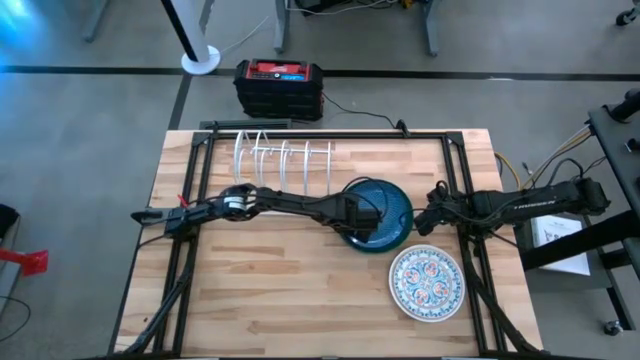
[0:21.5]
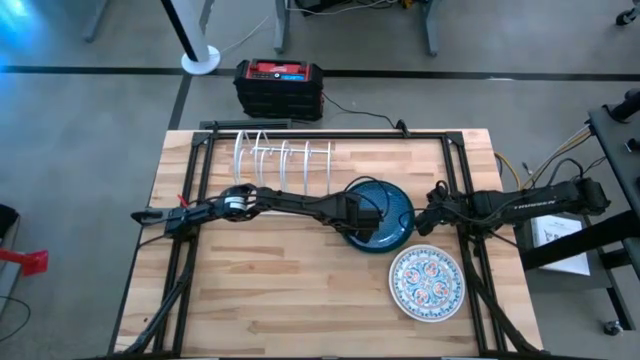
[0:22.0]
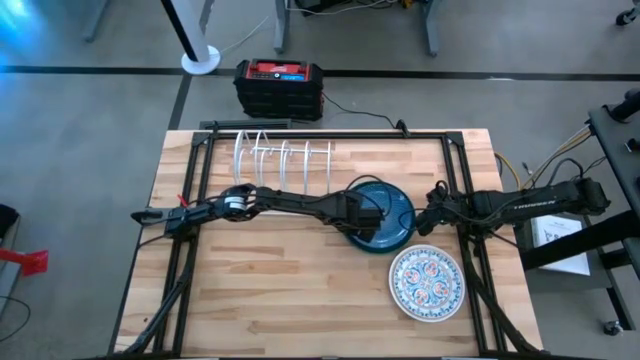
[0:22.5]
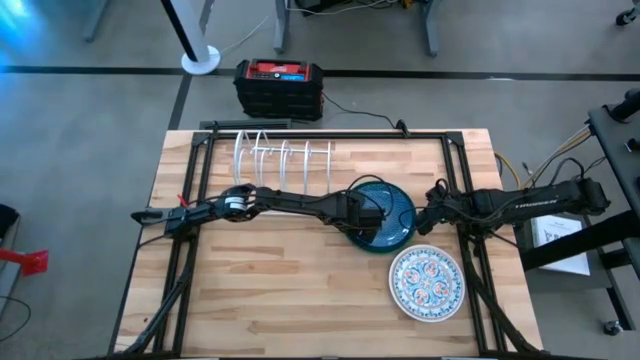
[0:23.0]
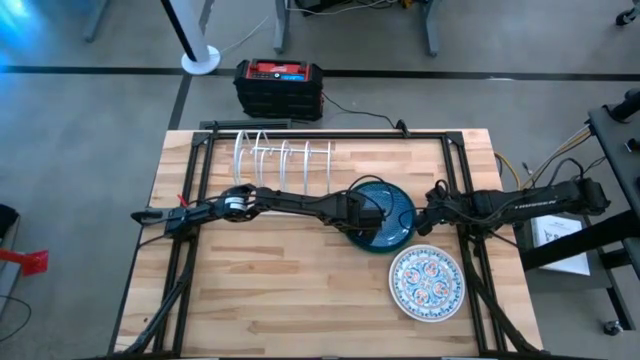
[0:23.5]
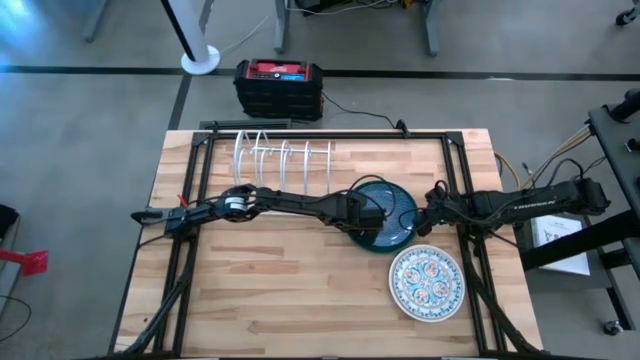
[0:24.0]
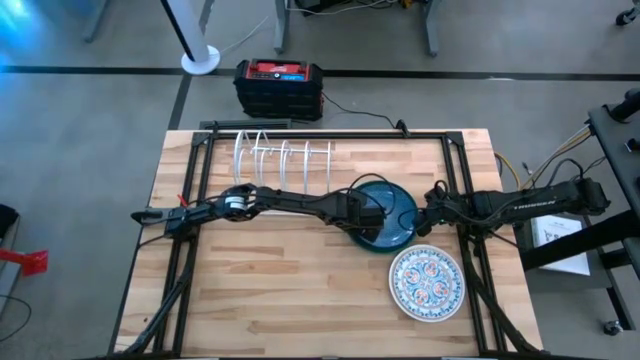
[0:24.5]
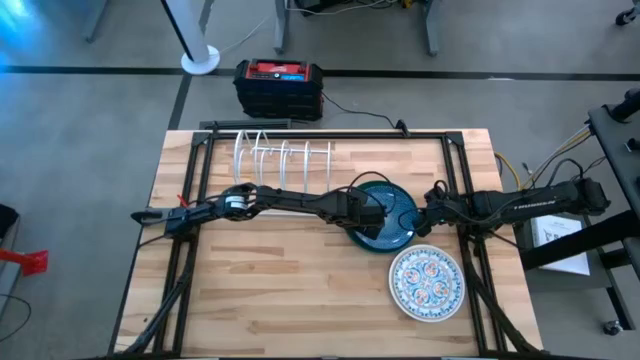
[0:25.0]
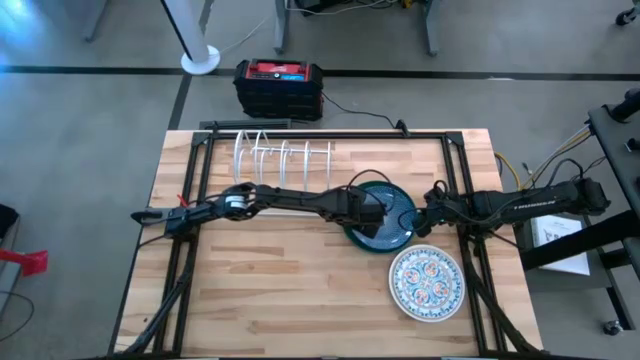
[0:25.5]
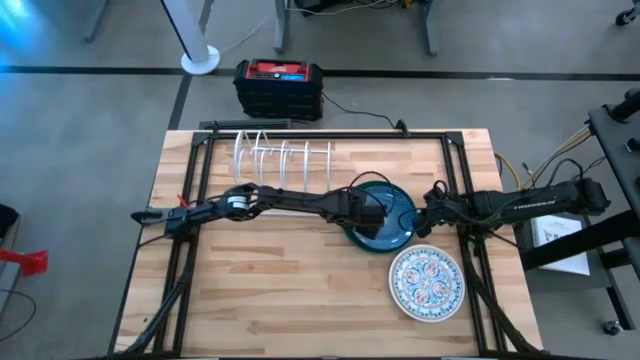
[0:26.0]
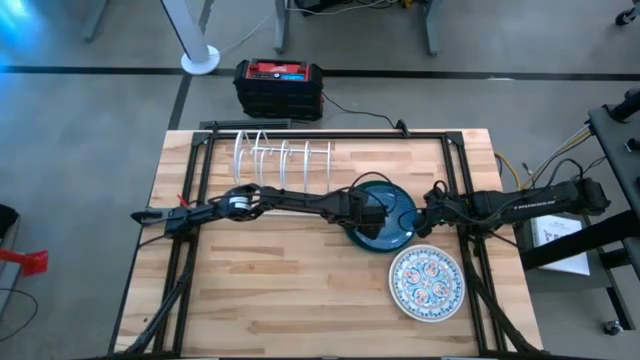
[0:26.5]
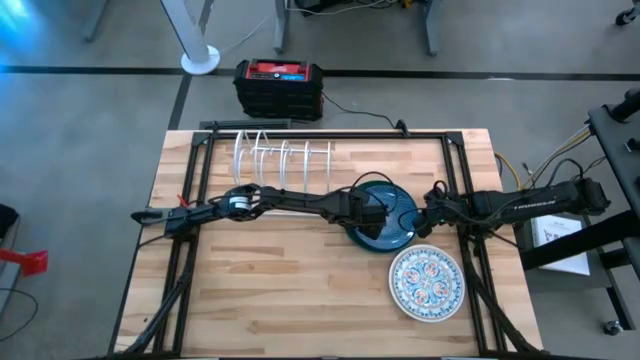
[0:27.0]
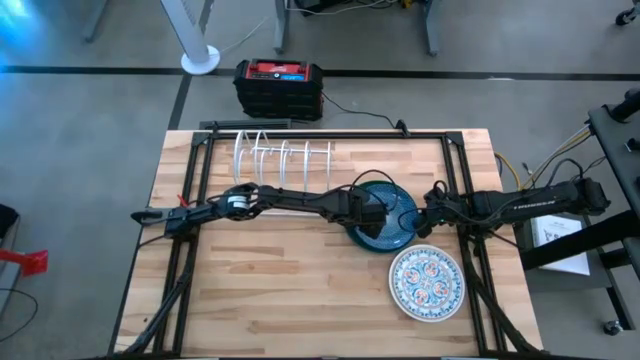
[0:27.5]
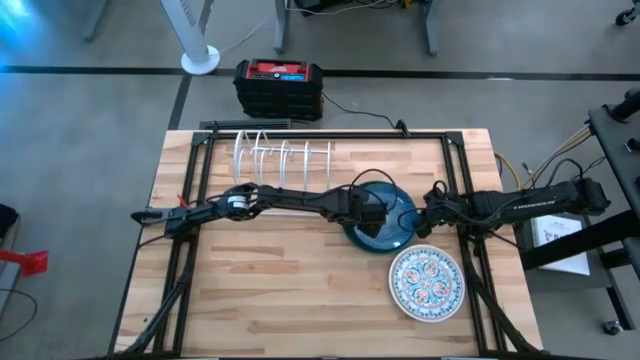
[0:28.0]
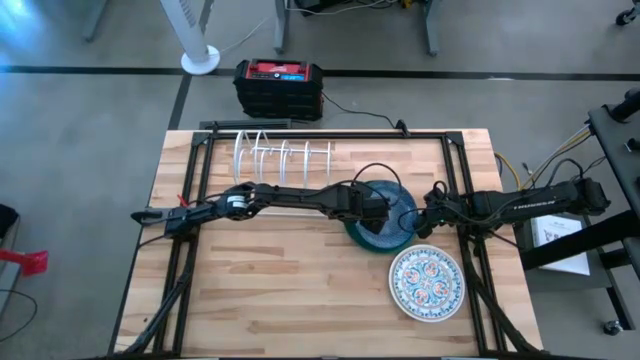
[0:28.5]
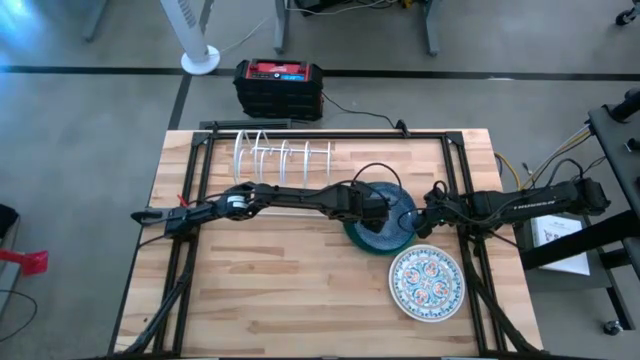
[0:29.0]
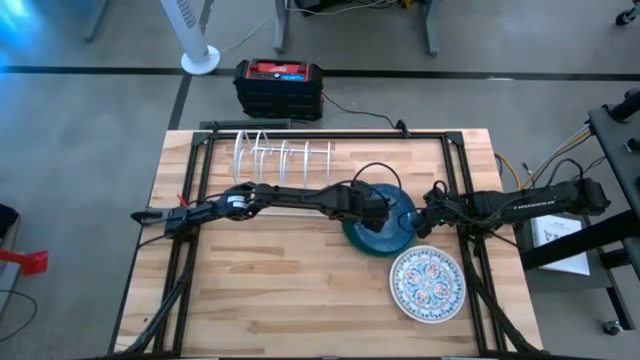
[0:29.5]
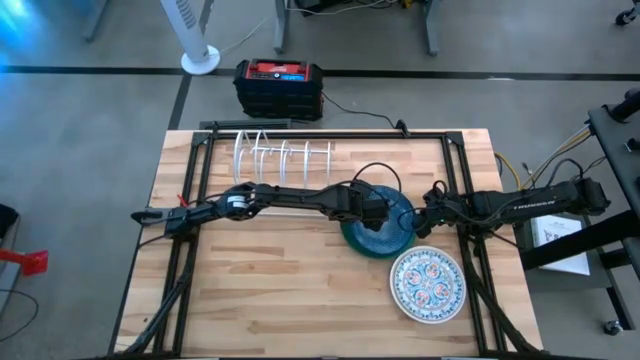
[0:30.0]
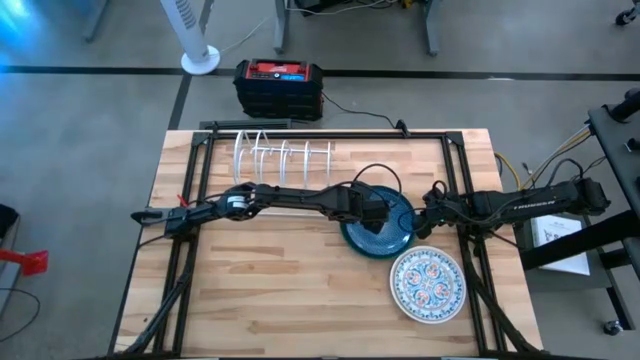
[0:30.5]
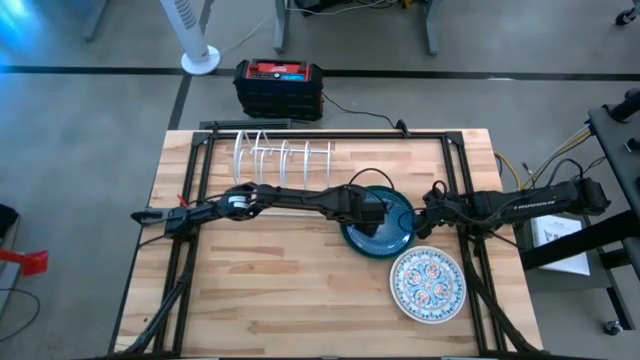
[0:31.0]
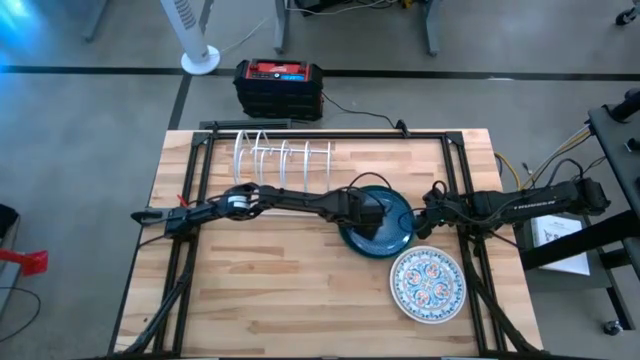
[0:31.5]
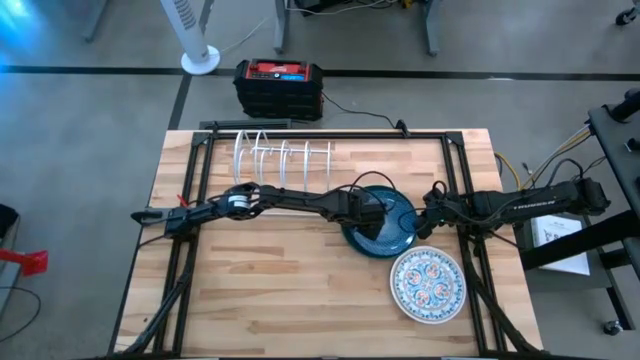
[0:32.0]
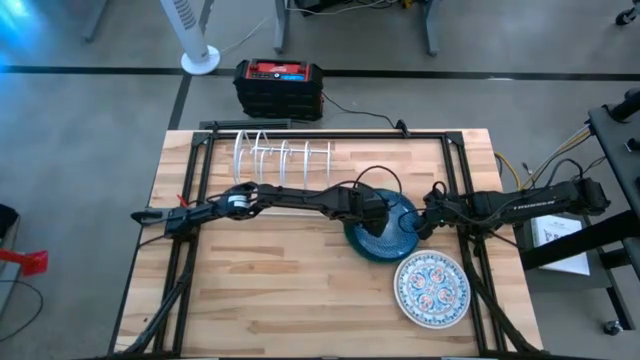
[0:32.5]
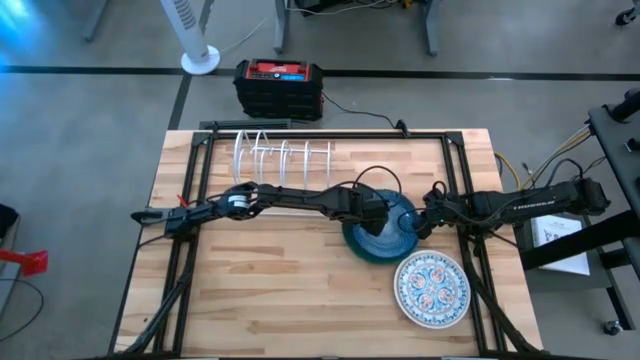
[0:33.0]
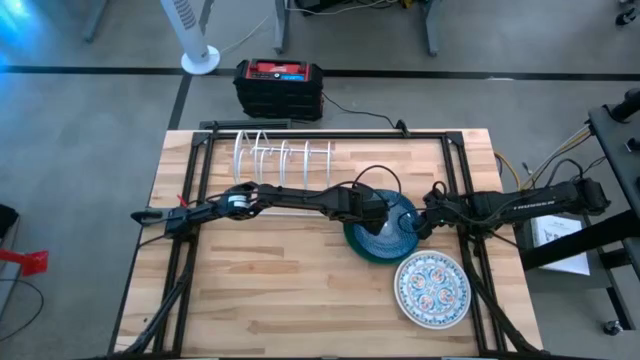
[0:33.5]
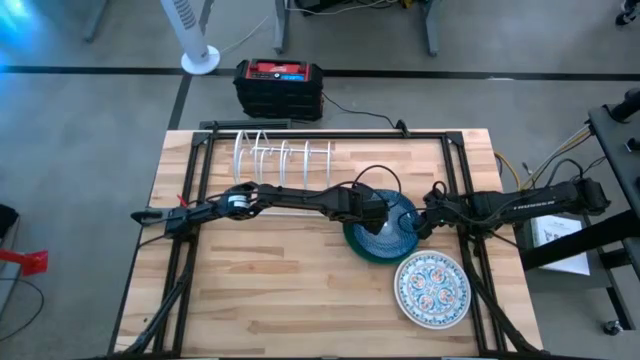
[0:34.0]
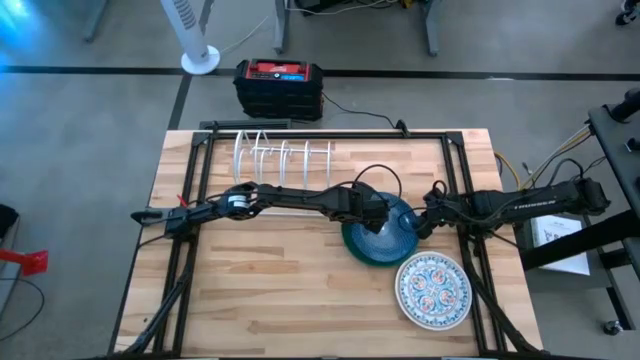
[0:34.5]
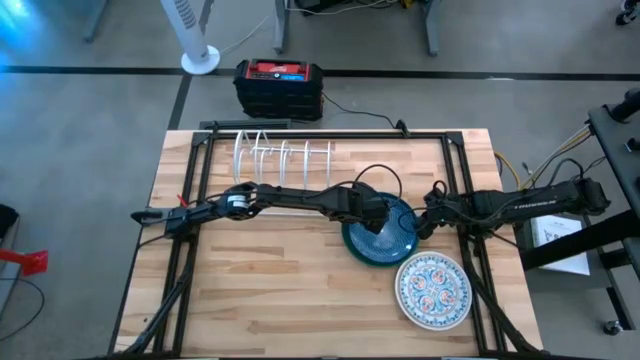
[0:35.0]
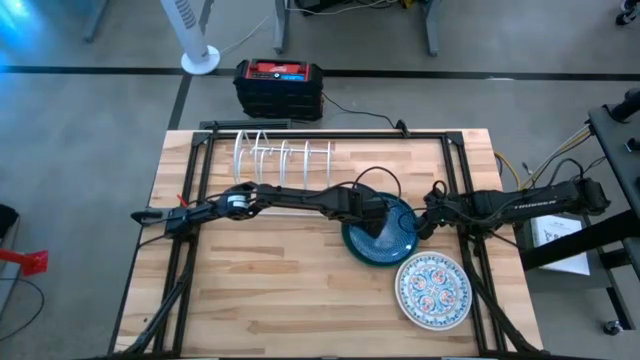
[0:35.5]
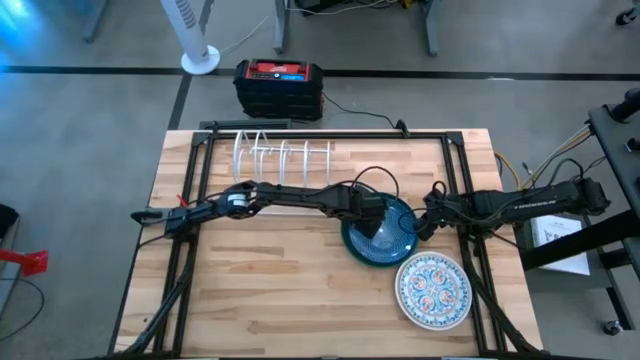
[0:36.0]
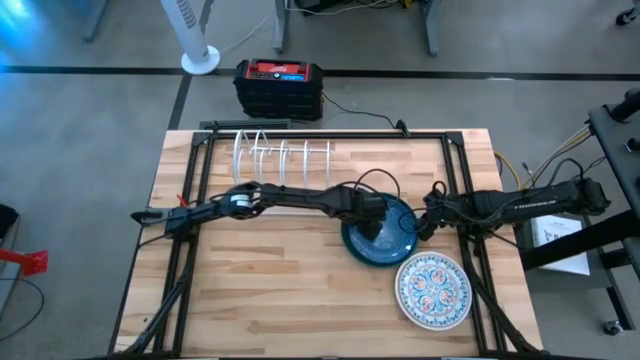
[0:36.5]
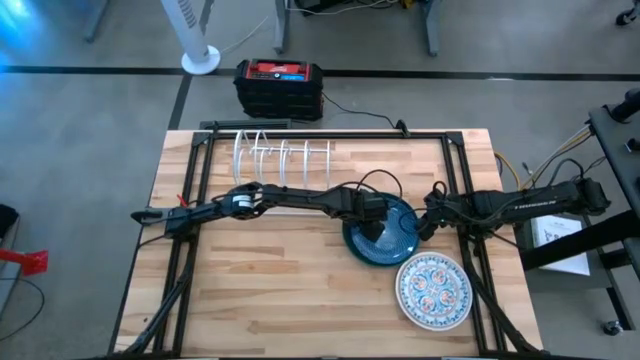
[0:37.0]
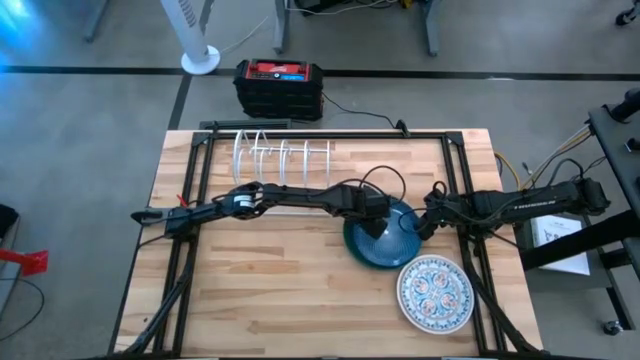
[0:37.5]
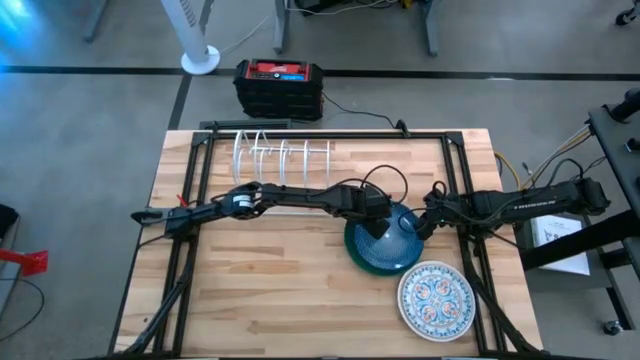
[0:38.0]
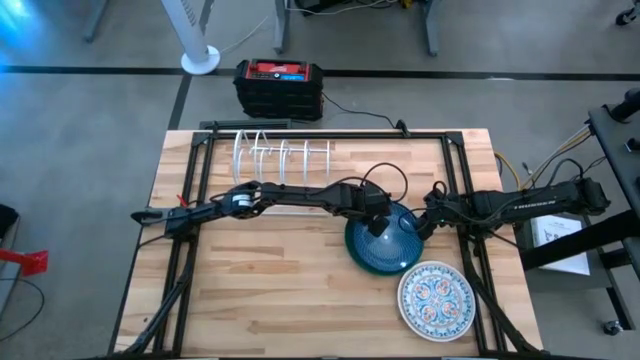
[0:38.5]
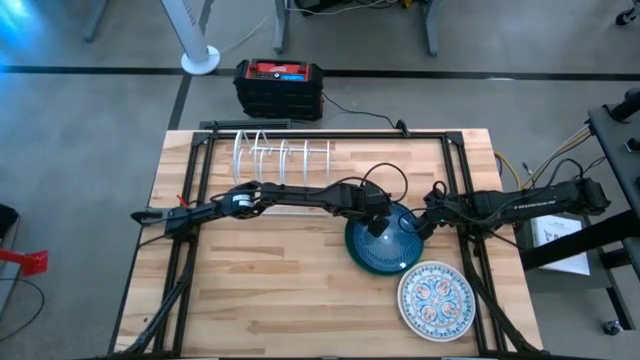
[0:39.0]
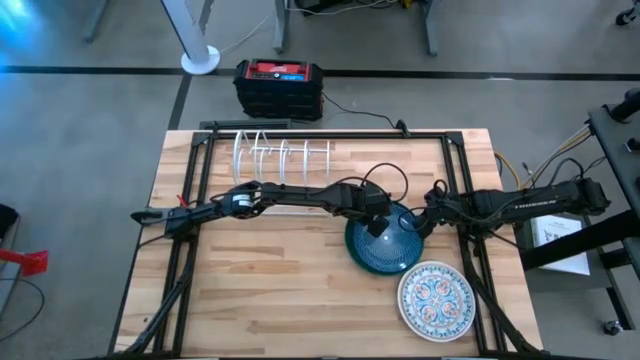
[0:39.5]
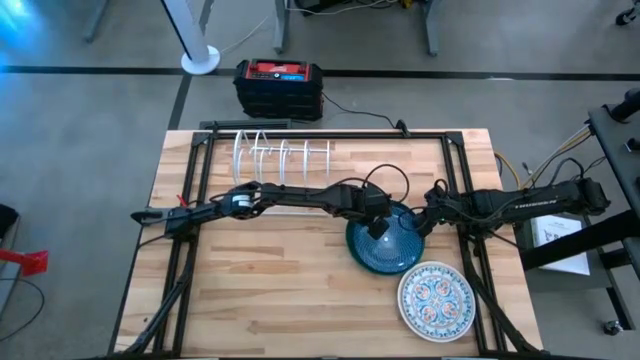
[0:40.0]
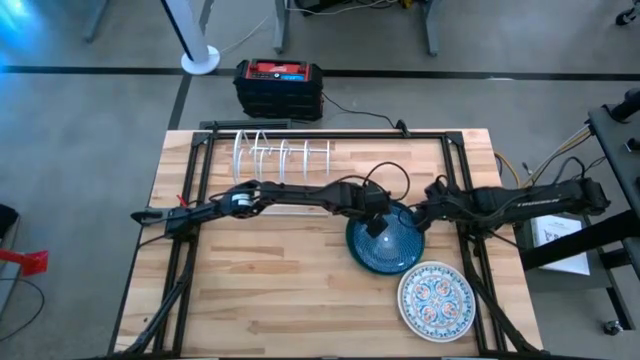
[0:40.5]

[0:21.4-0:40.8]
Task: Sort dishes
Put the blue patterned plate in the dish rack

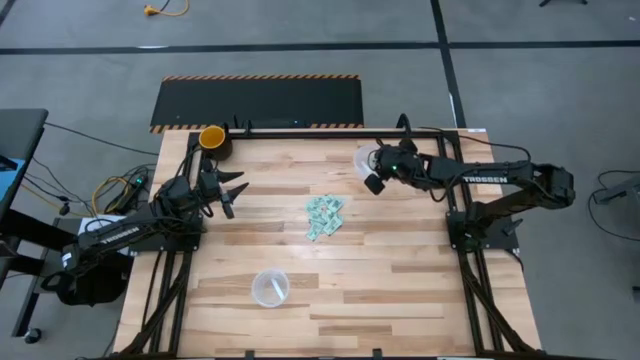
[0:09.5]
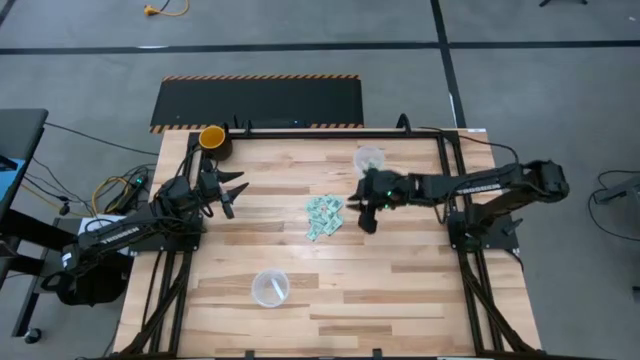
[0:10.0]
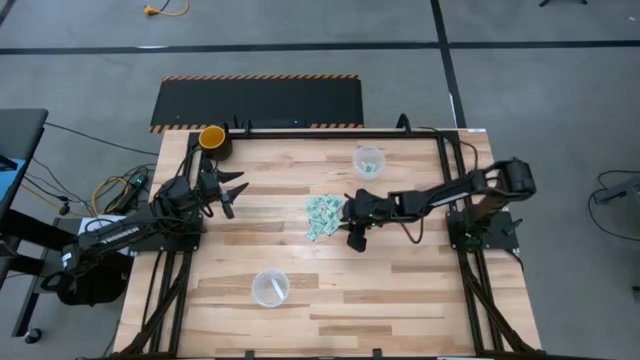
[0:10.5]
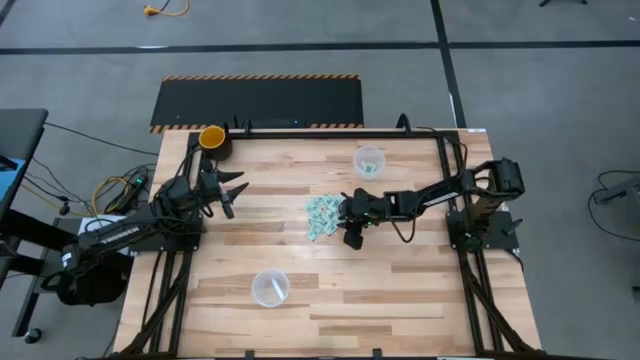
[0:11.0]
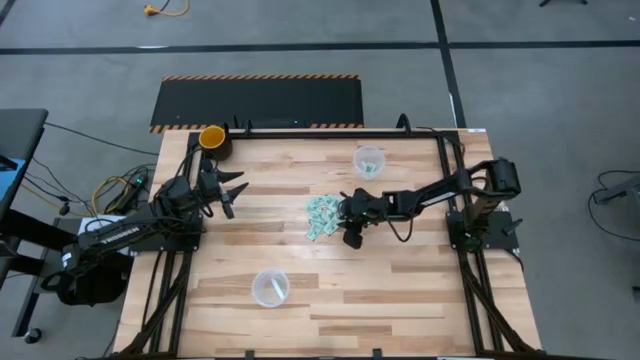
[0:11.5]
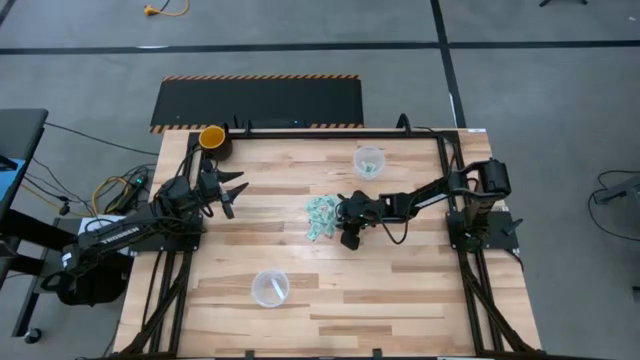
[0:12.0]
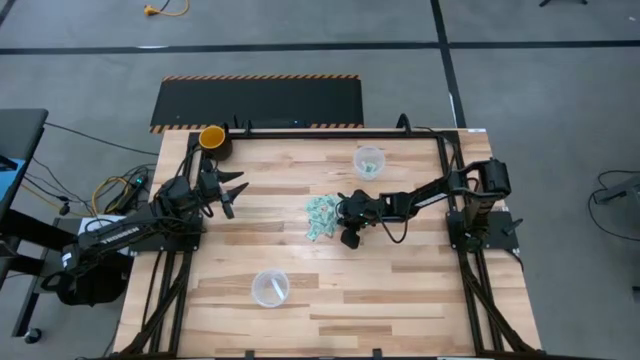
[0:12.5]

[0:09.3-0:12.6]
Task: Pick and place Stevia / Truvia into bins
Put the stevia packet into the top container
